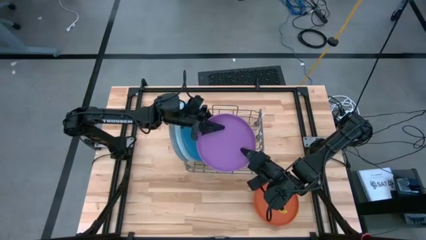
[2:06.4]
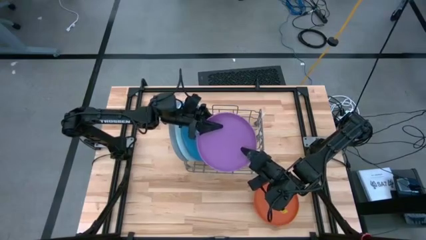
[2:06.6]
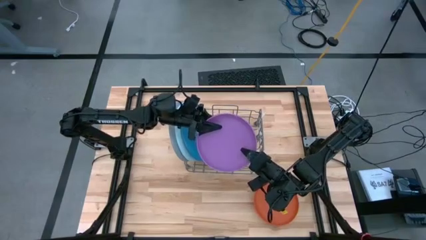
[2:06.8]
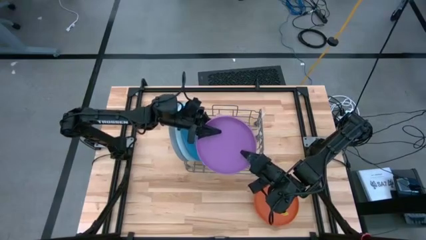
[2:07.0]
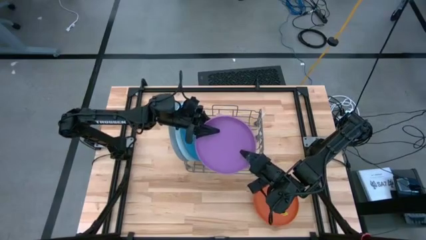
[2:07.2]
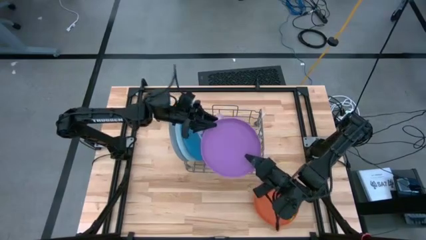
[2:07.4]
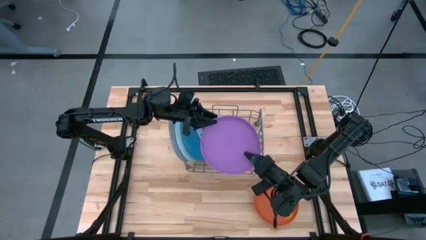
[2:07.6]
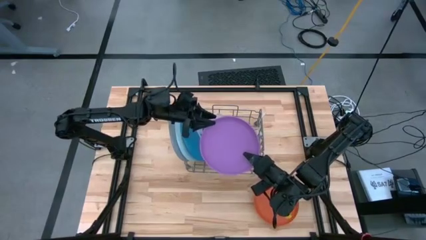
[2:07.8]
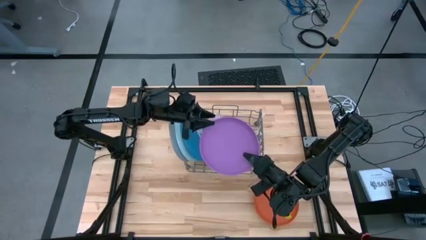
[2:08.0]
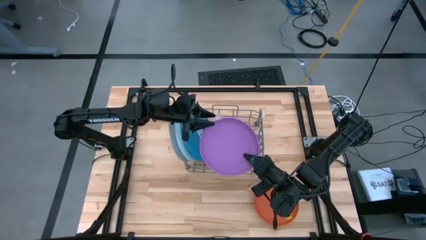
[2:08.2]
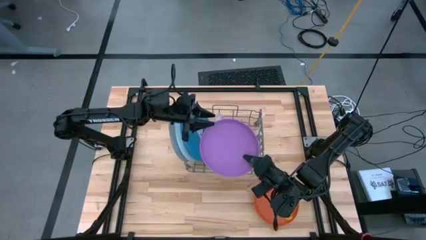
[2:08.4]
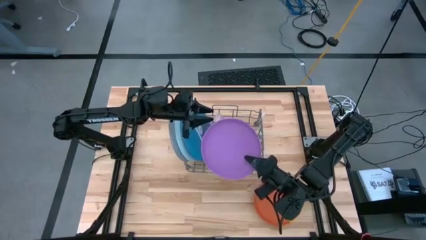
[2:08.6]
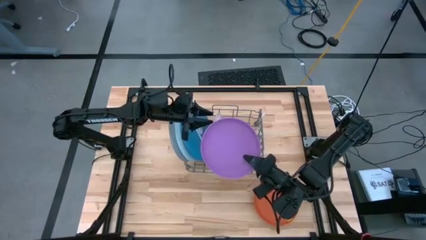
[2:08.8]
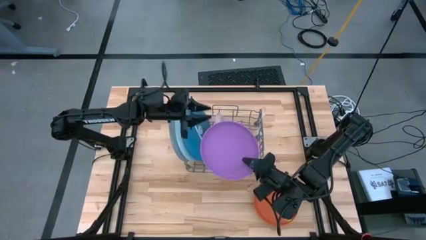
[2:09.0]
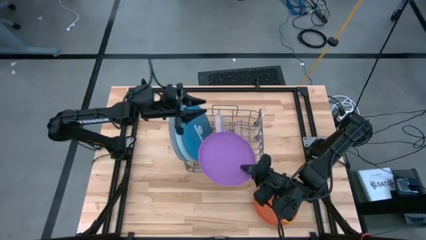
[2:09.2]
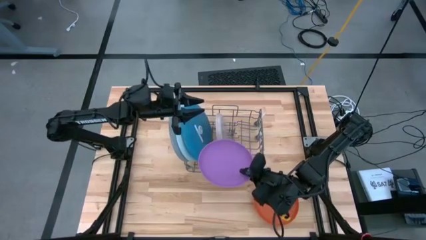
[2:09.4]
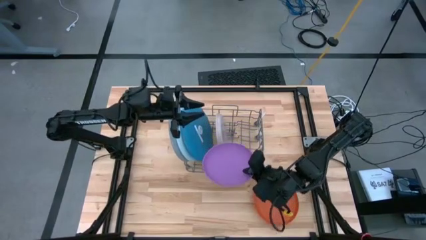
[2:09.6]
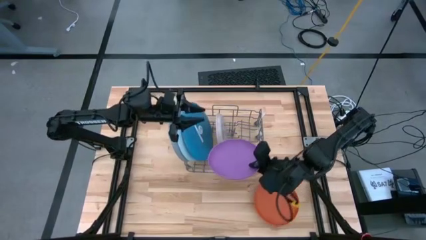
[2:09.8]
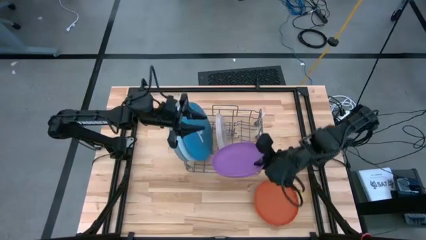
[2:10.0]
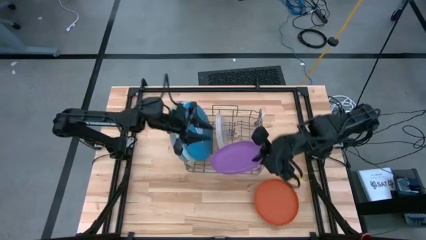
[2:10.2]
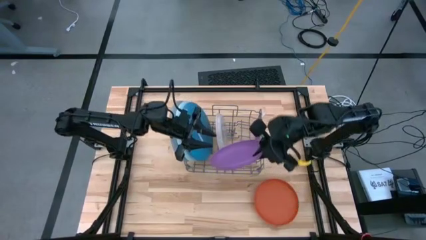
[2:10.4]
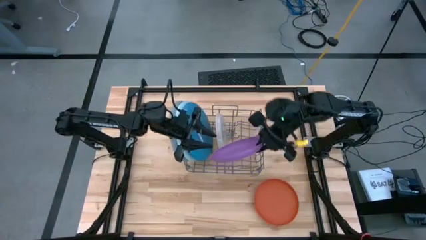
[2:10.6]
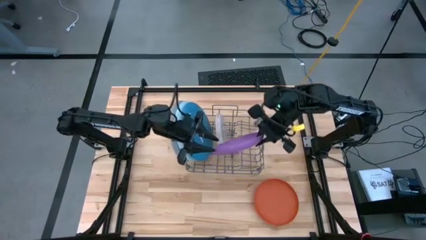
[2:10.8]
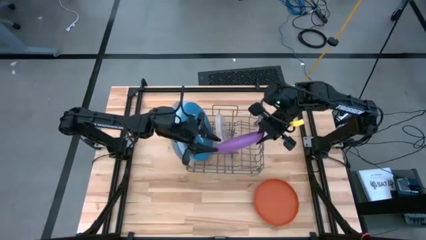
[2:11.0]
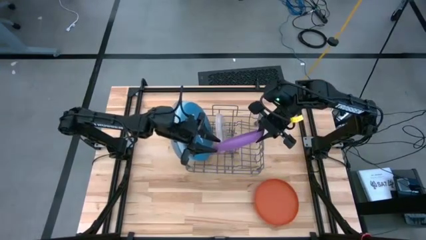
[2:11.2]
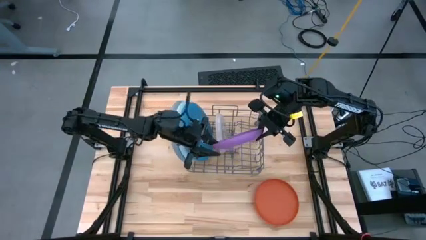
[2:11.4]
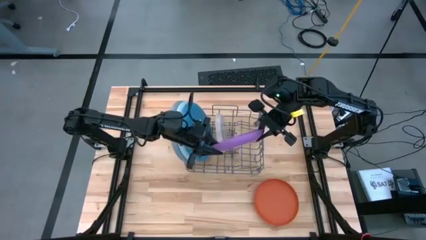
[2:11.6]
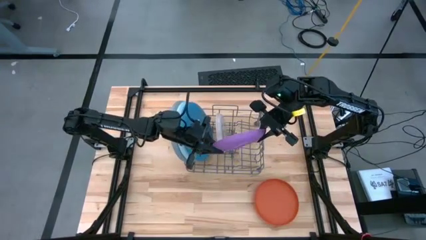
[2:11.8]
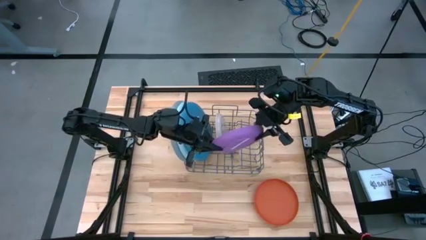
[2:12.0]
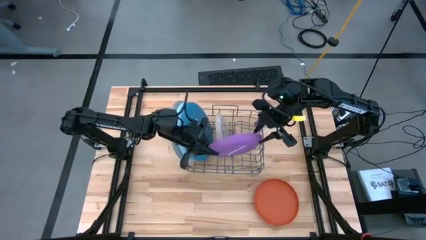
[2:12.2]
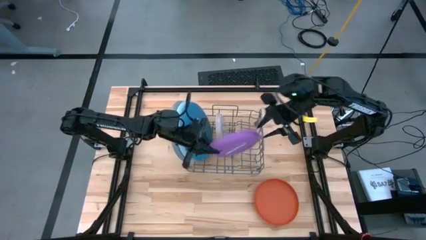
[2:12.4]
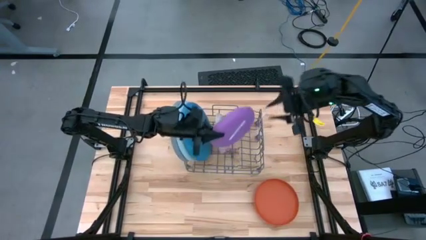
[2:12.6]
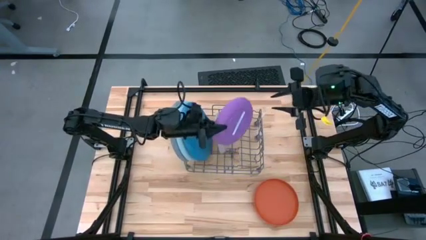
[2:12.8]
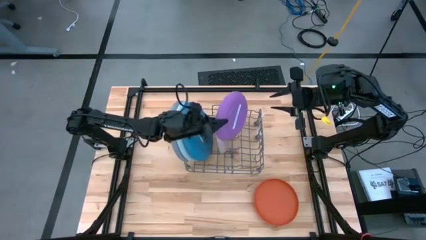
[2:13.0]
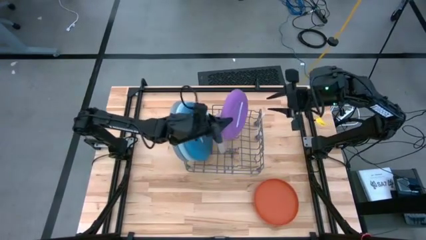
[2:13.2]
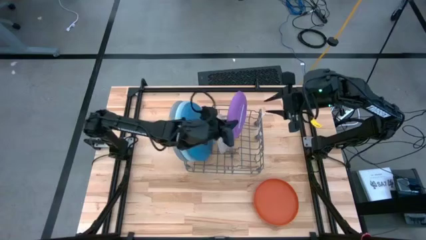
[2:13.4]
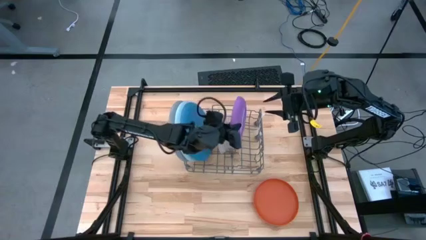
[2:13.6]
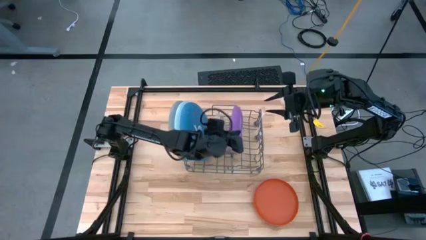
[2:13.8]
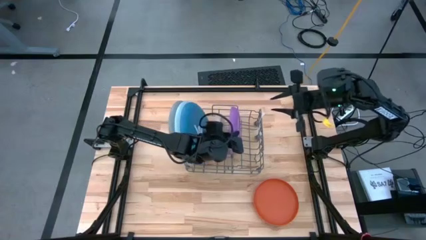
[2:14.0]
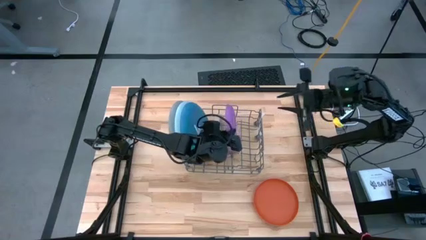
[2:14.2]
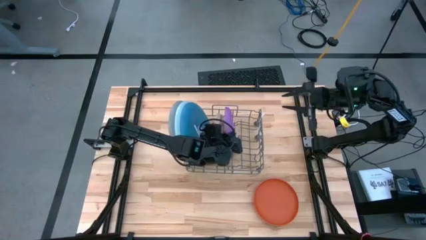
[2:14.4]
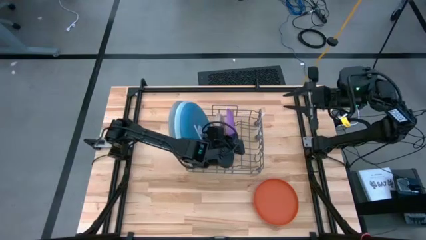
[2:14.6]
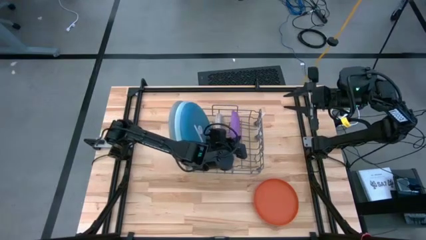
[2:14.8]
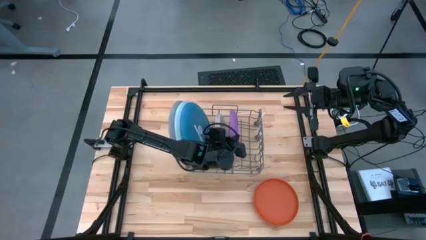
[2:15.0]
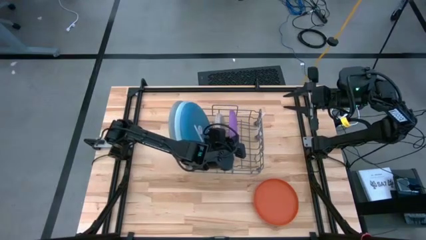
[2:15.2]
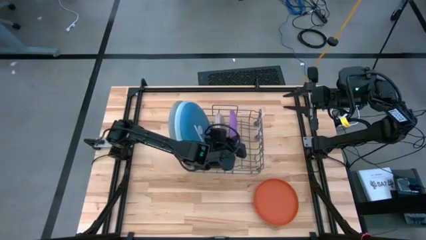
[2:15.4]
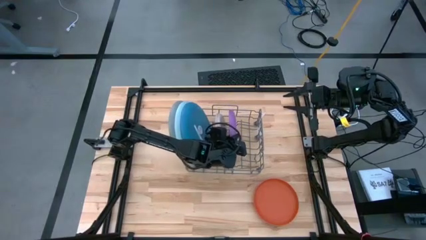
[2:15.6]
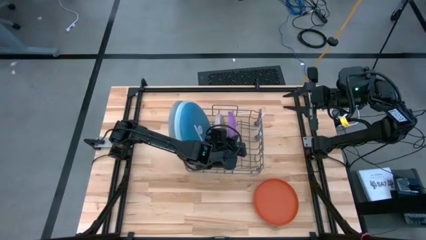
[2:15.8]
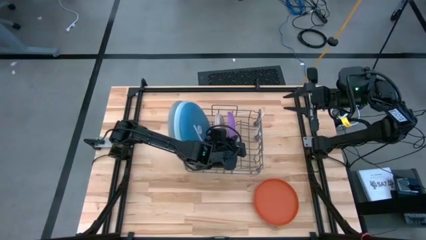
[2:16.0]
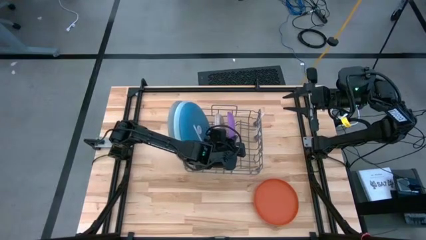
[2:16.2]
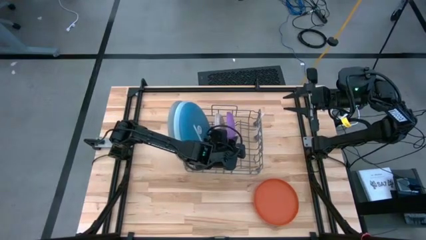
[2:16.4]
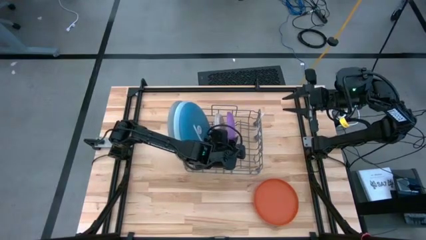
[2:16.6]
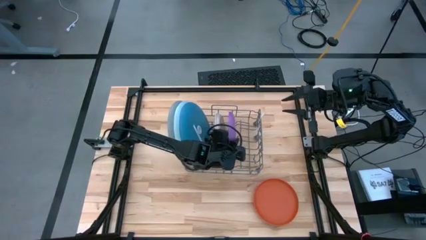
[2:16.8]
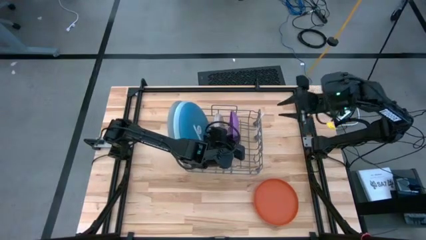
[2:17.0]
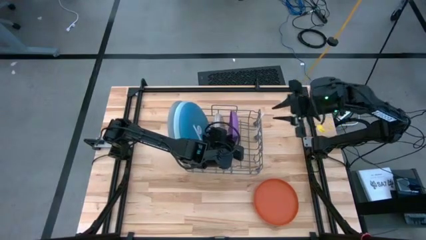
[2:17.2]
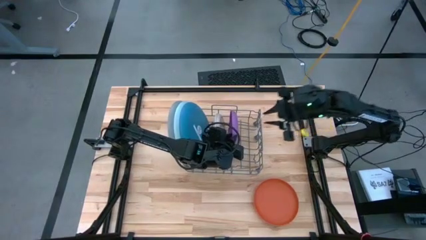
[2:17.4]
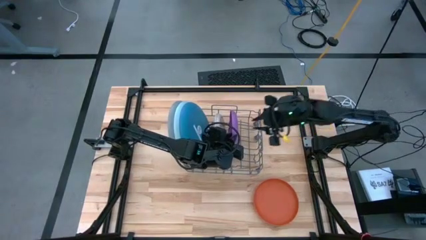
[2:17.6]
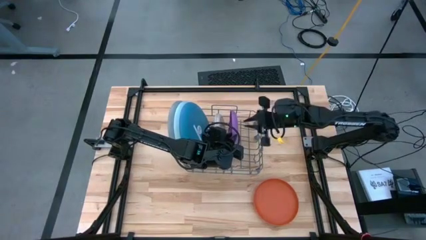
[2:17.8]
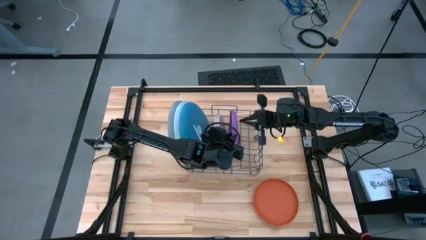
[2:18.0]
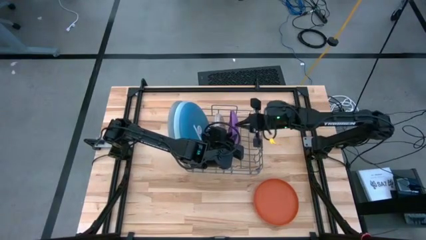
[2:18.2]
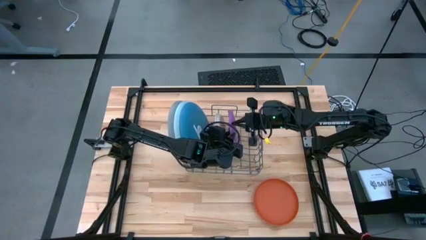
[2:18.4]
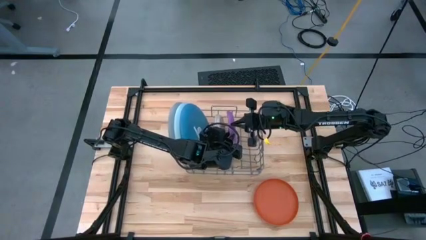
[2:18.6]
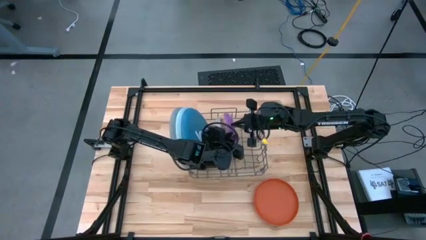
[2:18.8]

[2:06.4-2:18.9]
Task: Sort dishes
Put the violet plate into the dish rack
